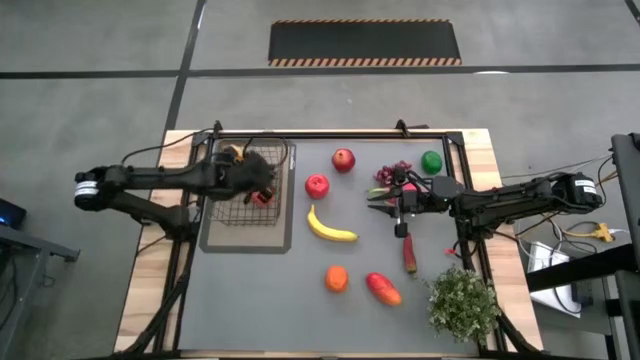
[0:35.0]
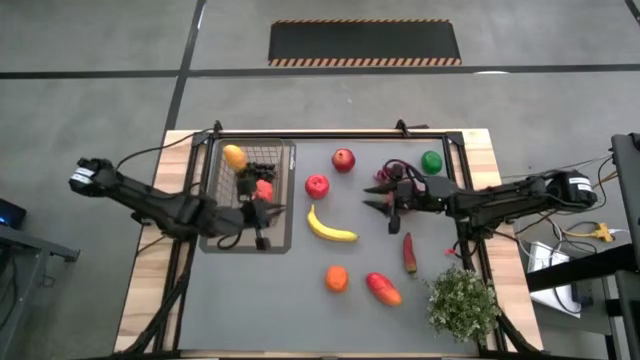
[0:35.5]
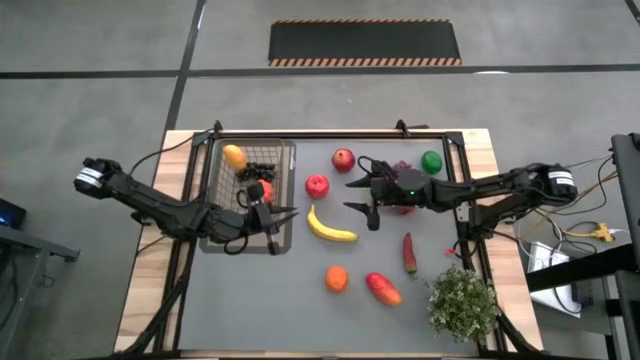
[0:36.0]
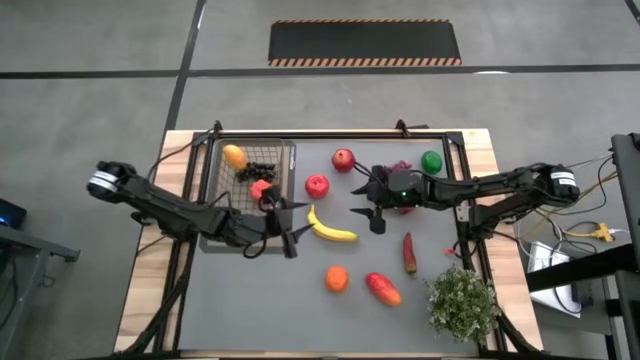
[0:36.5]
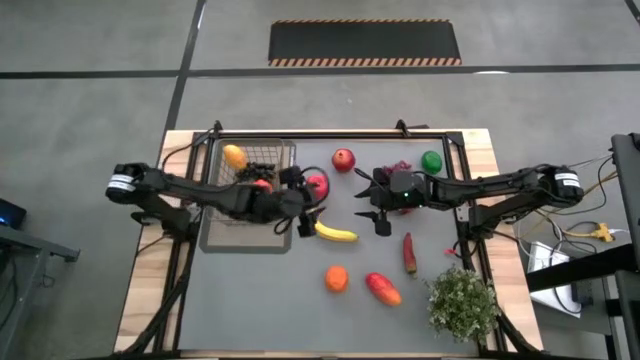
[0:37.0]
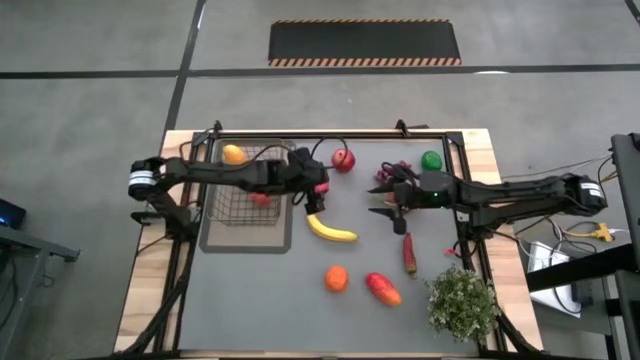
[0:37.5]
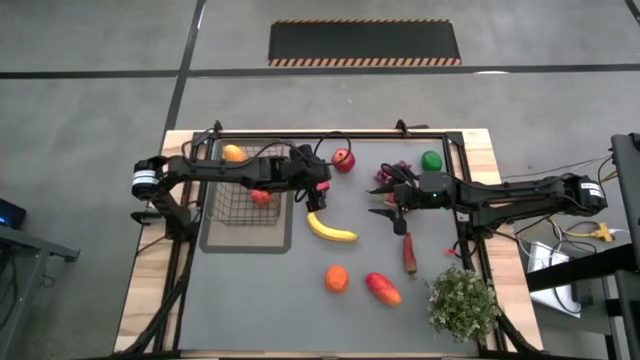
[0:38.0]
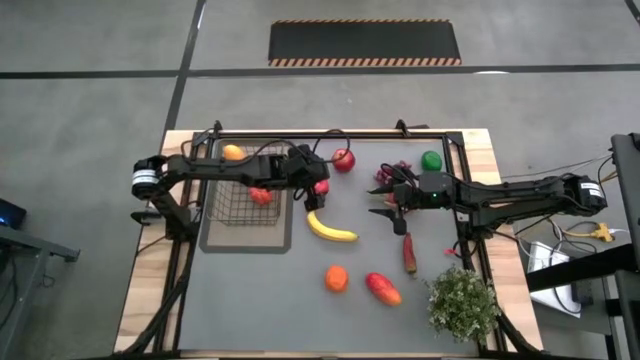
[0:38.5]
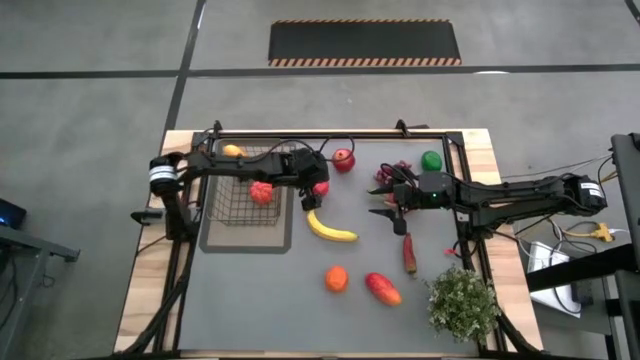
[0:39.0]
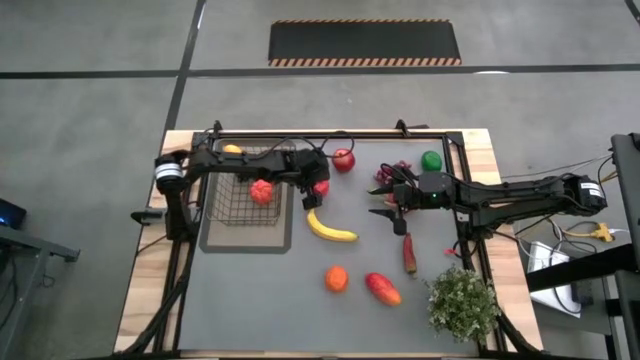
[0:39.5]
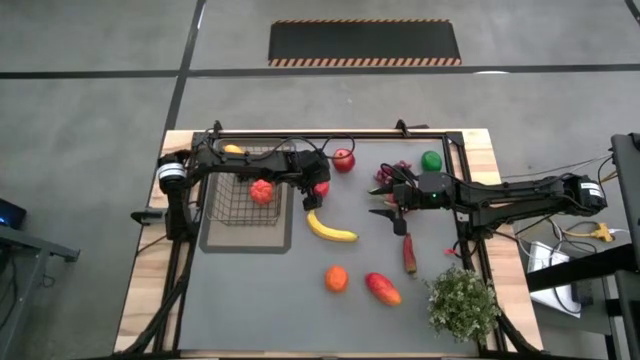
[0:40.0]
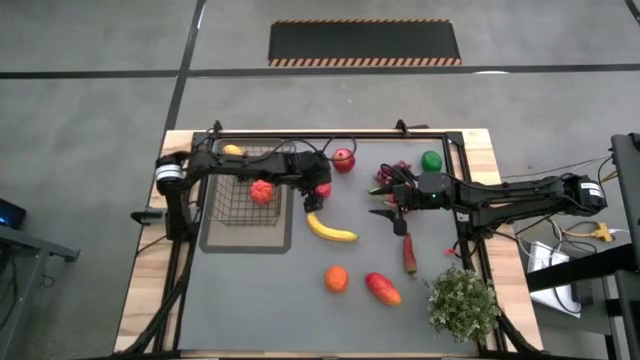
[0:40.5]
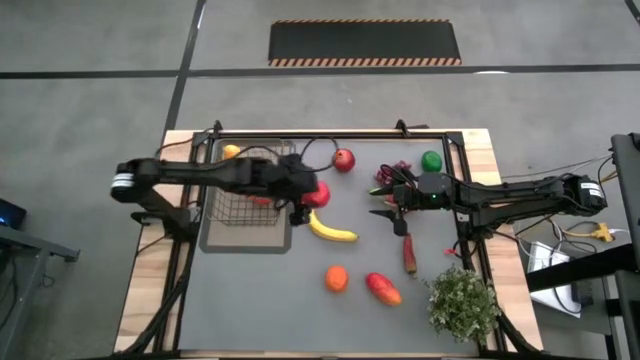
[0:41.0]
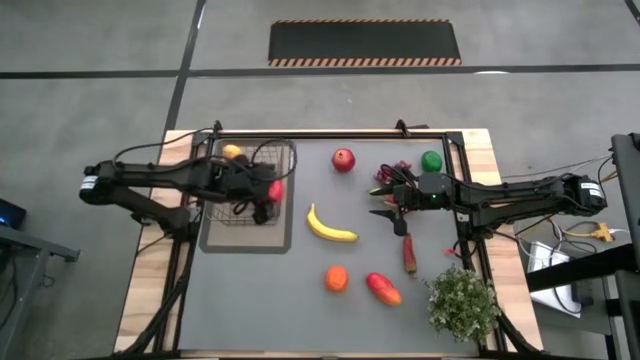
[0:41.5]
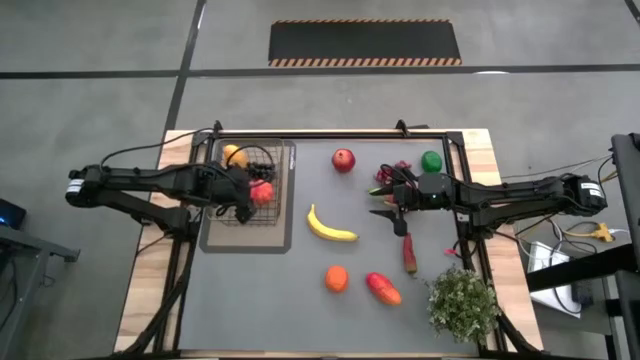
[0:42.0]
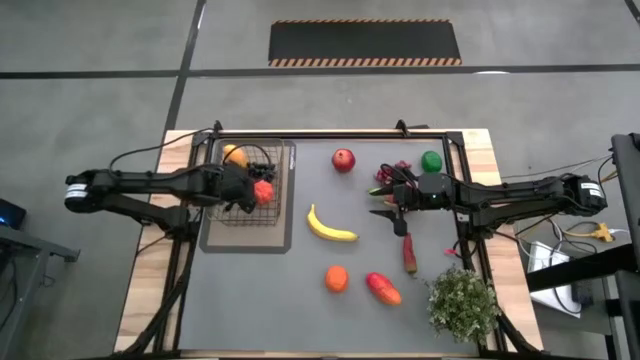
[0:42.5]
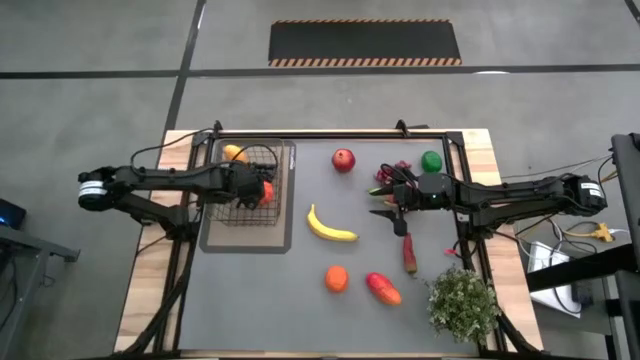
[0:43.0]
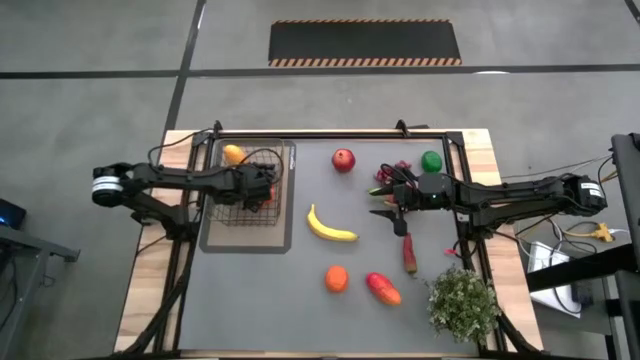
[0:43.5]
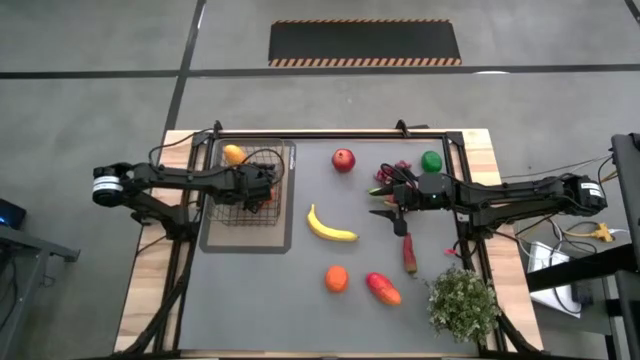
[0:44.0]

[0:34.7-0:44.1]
Task: Build produce basket
Put the red apple into the gold wire basket

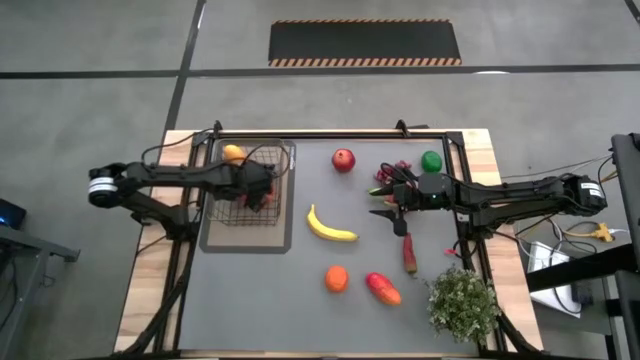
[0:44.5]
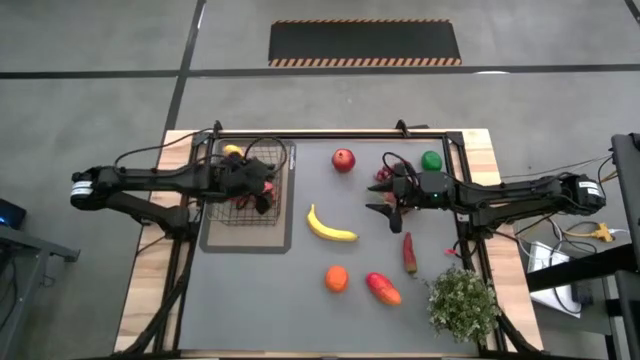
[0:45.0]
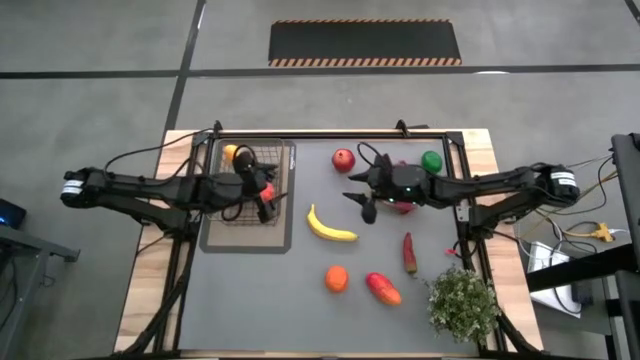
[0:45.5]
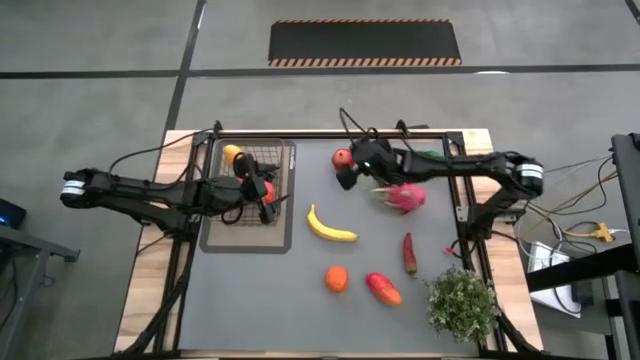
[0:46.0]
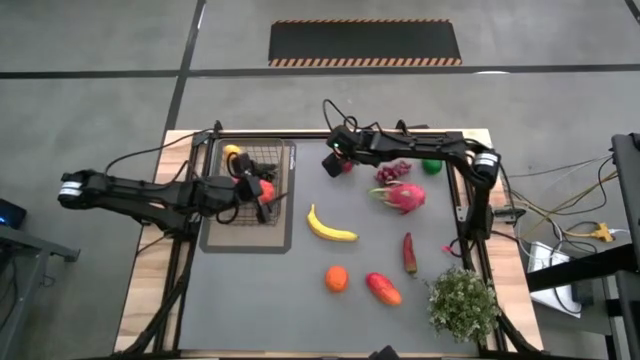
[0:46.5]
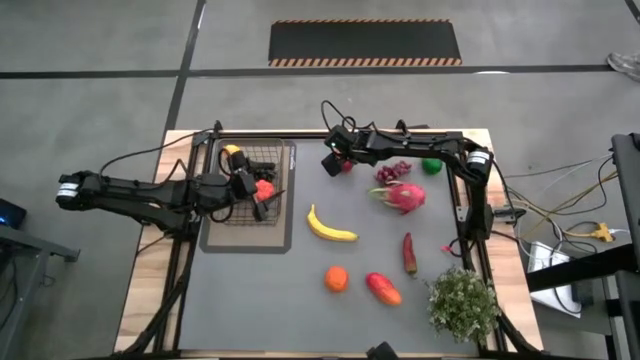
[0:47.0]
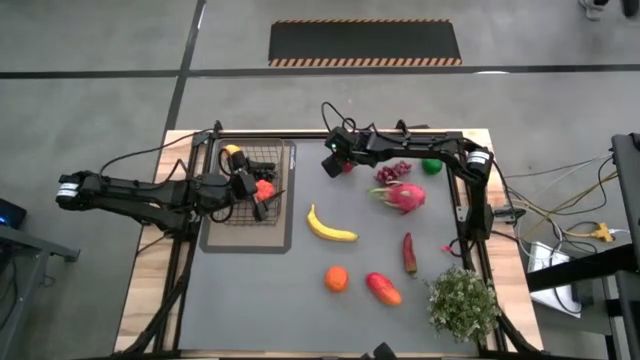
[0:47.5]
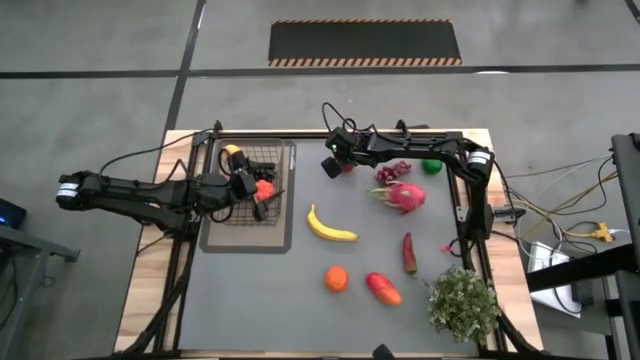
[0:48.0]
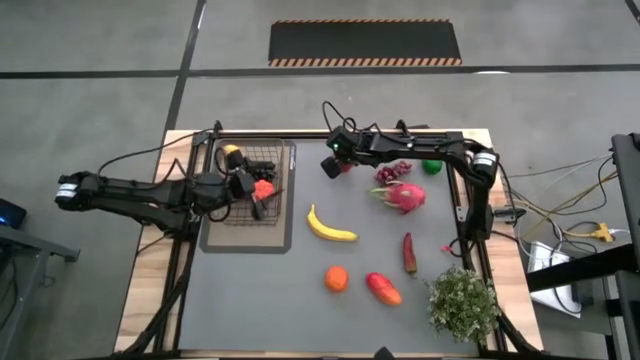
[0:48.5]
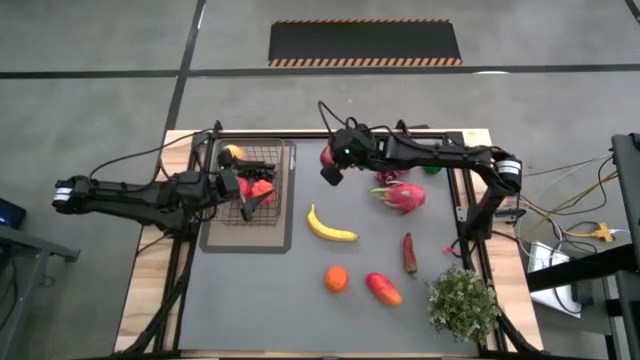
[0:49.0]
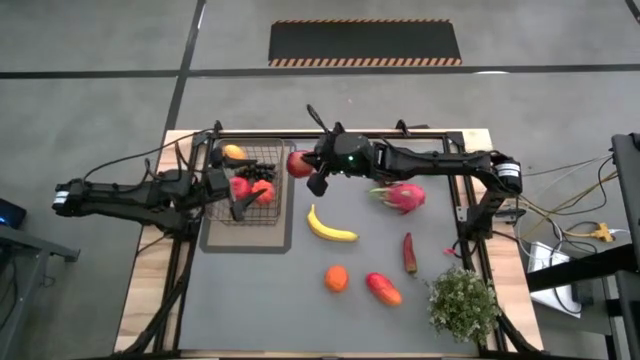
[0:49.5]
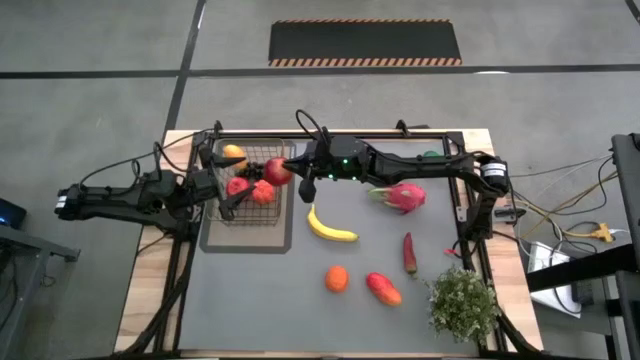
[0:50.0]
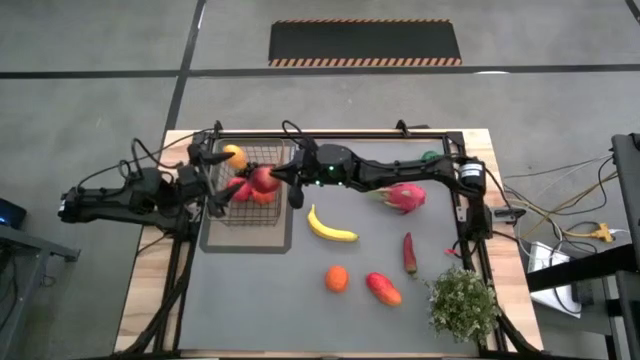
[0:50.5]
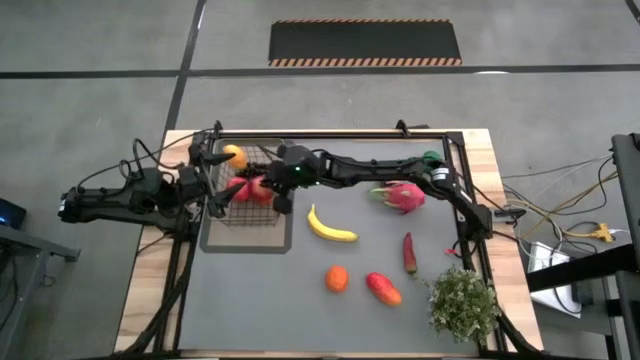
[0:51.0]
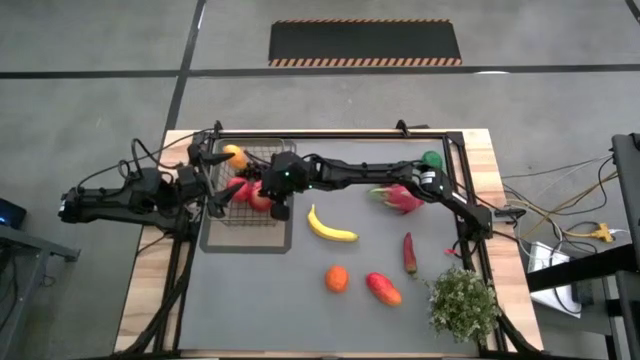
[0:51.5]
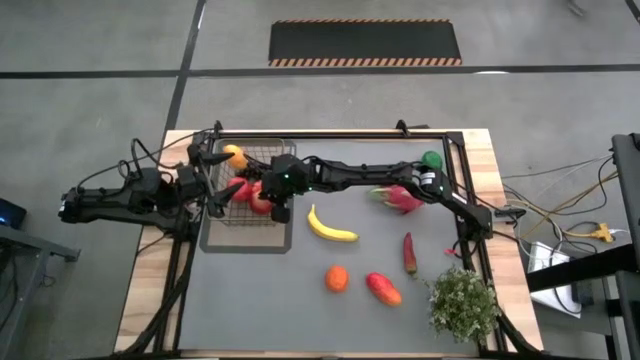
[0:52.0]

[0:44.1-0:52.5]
Put the red pomegranate into the gold wire basket

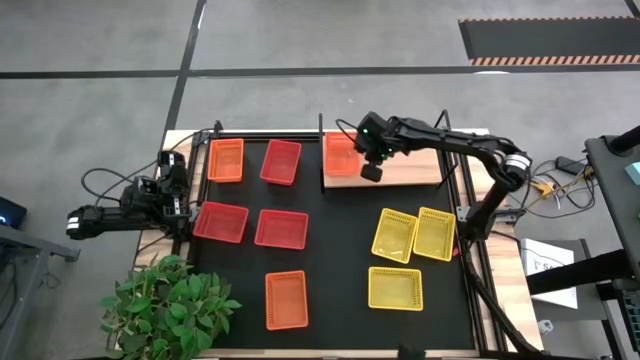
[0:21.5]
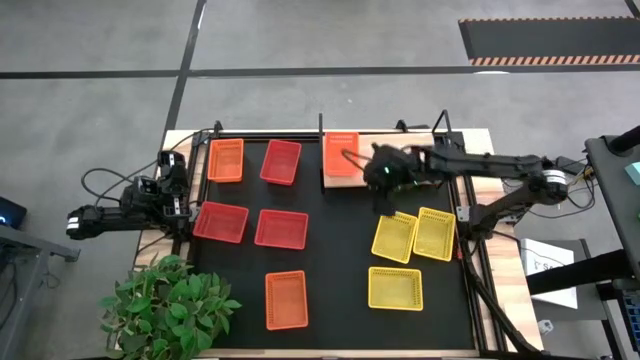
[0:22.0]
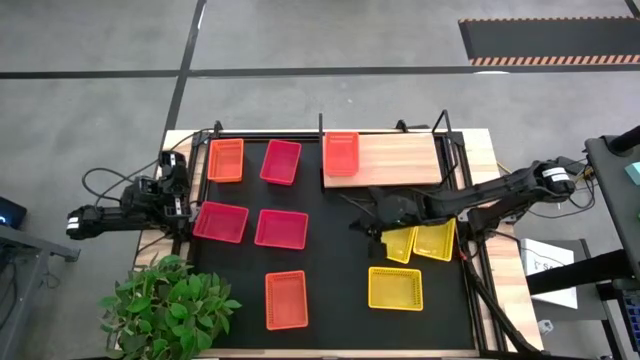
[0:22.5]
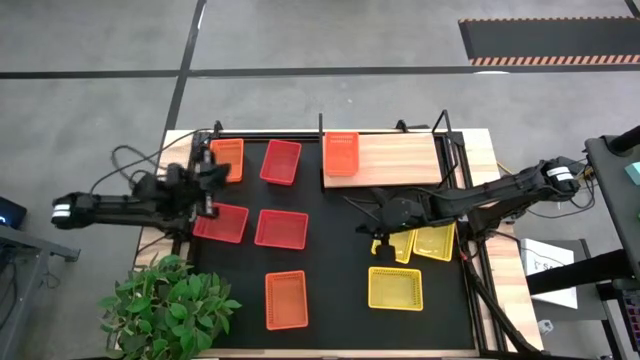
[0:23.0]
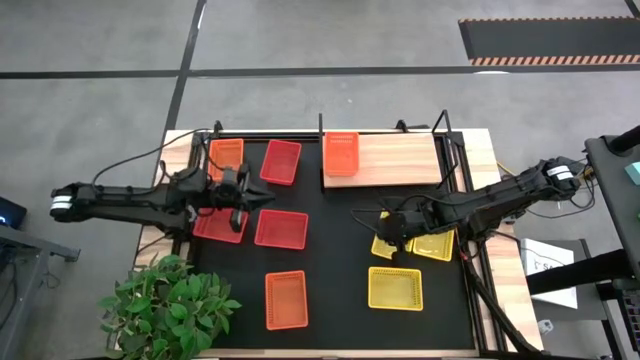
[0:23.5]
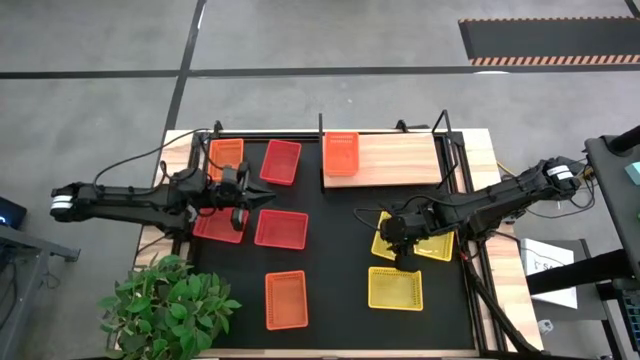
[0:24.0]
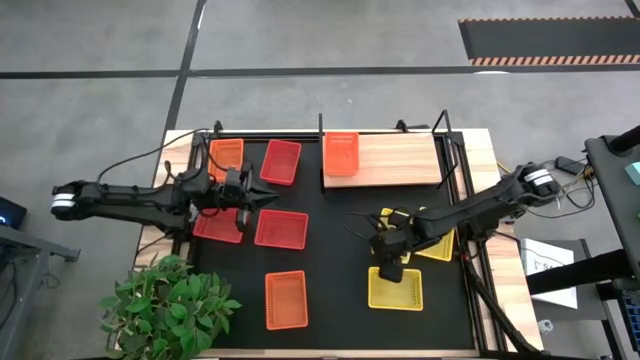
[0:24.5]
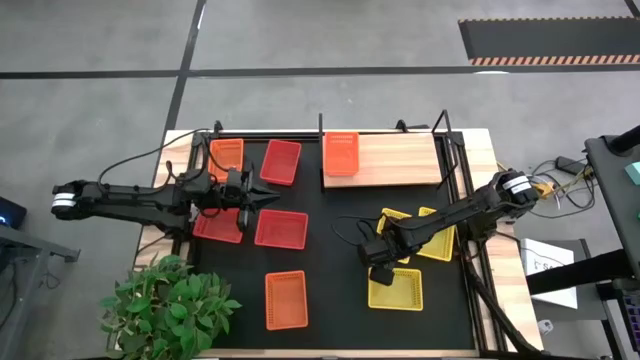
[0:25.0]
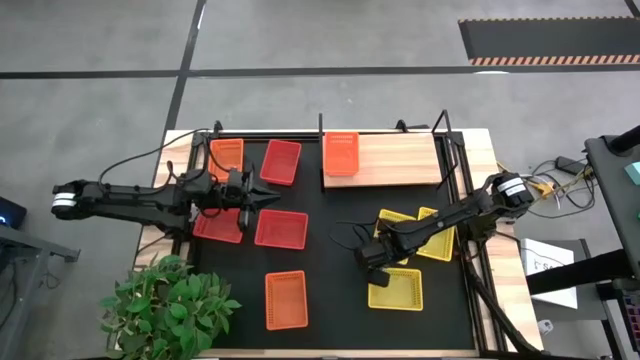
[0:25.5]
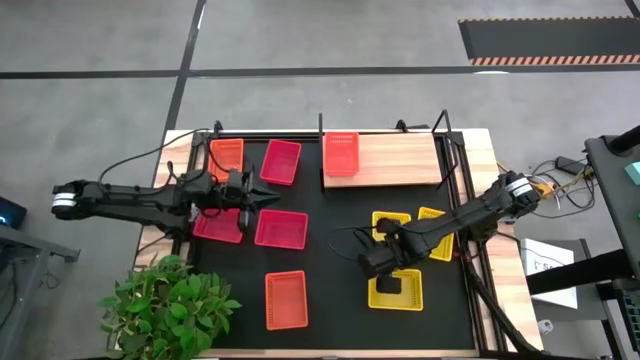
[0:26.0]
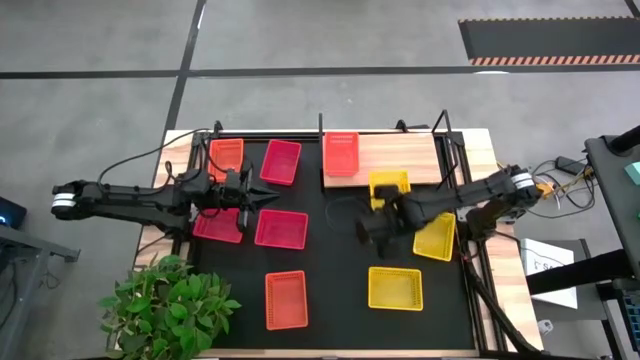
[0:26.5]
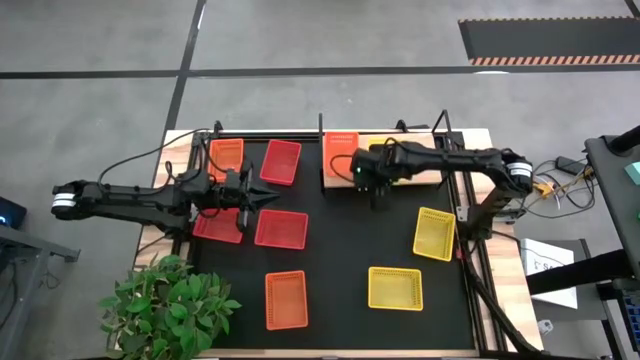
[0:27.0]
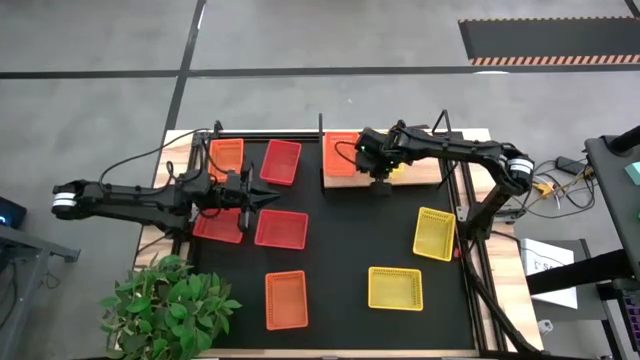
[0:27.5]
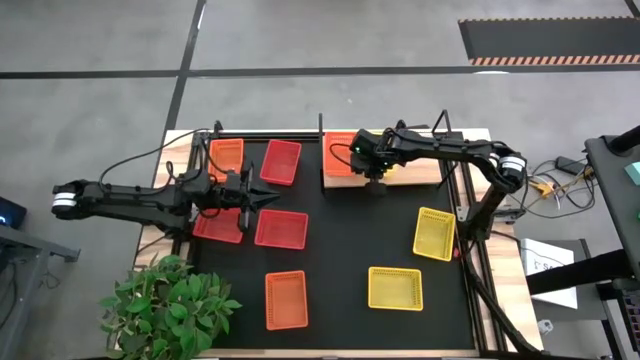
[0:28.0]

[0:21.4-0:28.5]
Task: Stack baskets on shelf by color
Put the top left yellow bin on the shelf
